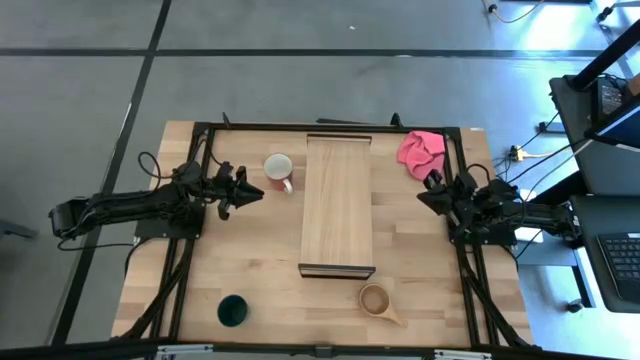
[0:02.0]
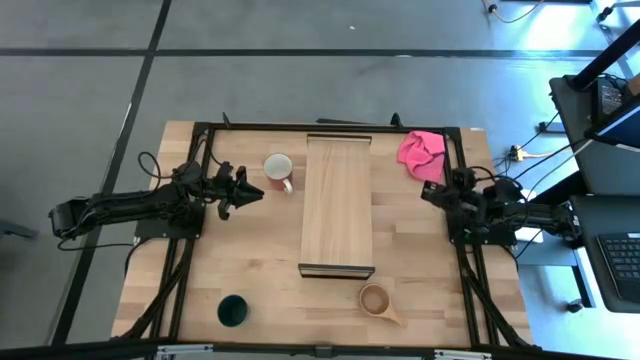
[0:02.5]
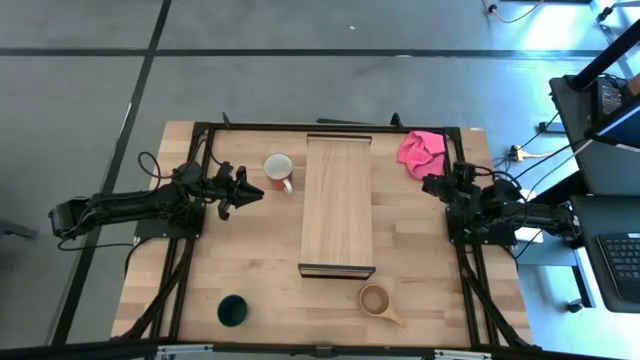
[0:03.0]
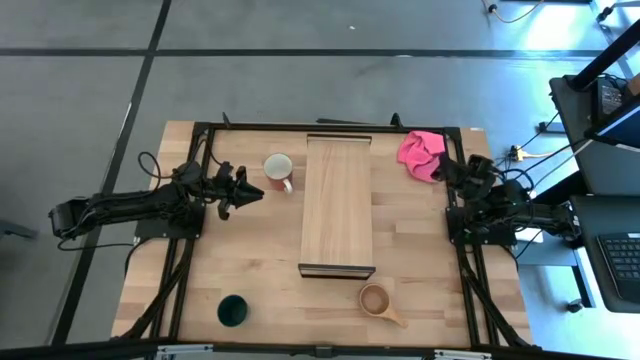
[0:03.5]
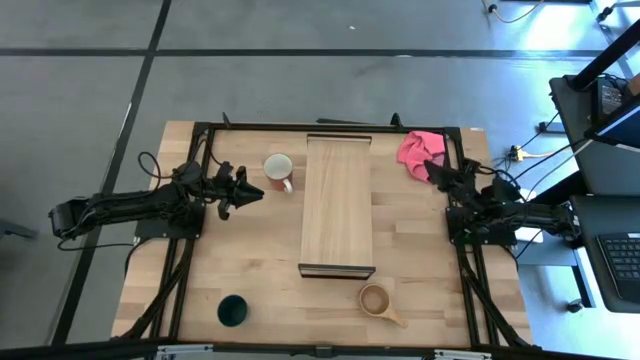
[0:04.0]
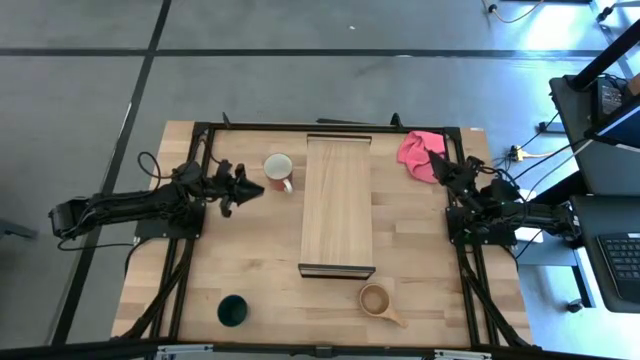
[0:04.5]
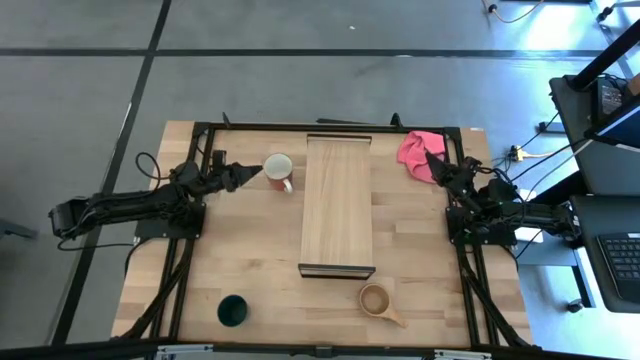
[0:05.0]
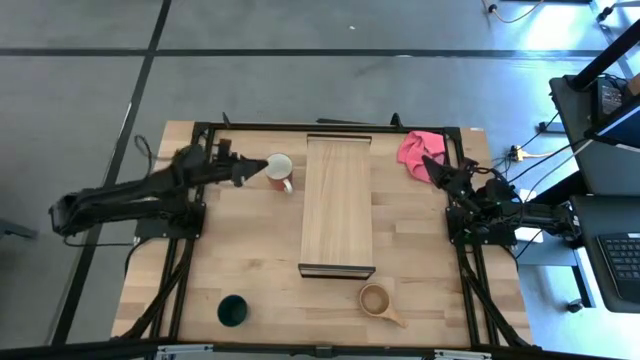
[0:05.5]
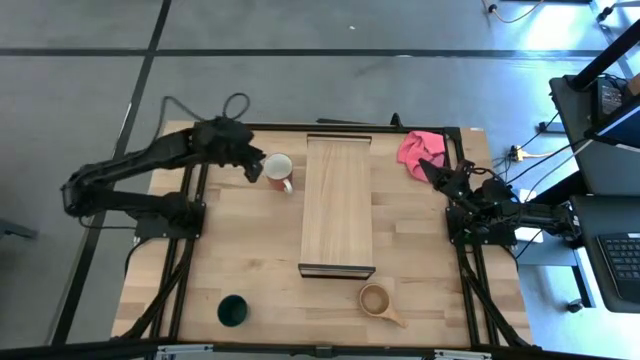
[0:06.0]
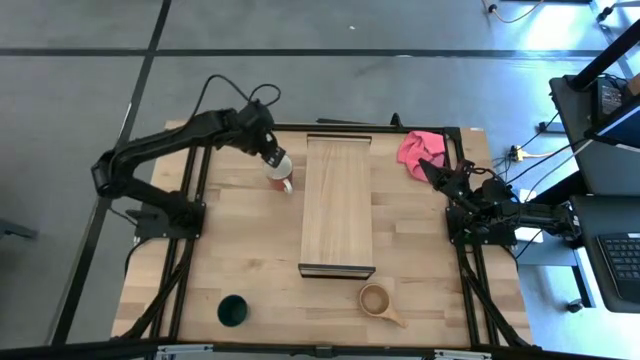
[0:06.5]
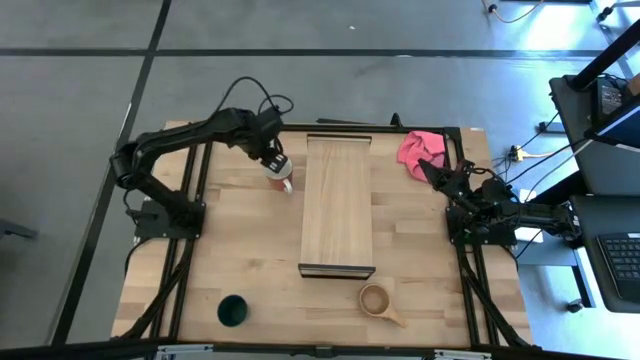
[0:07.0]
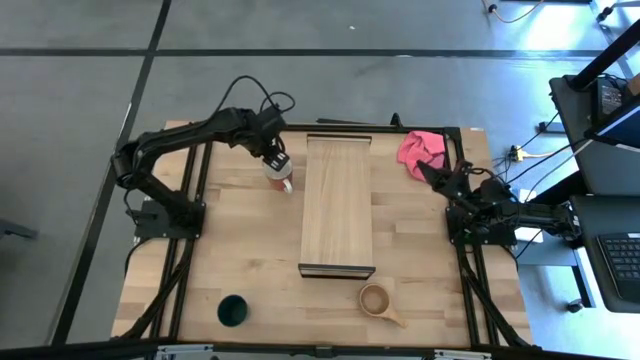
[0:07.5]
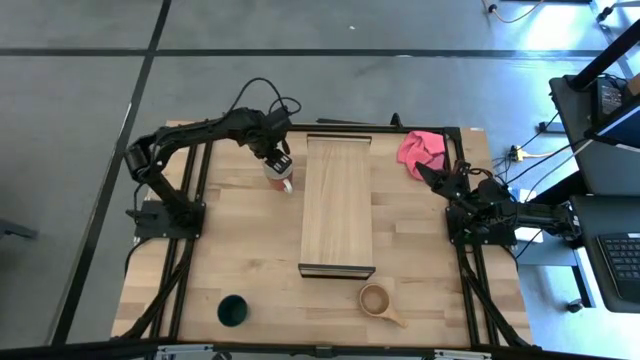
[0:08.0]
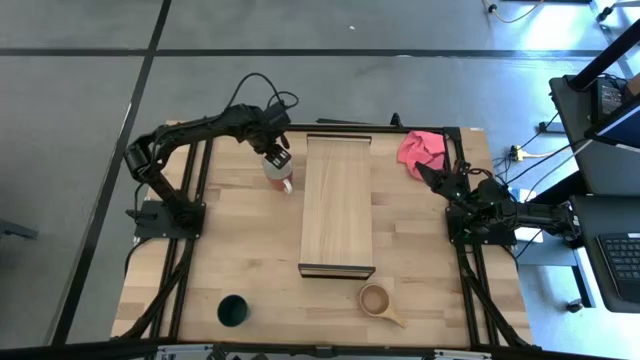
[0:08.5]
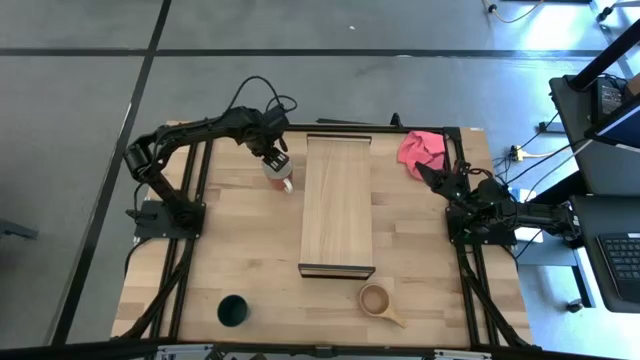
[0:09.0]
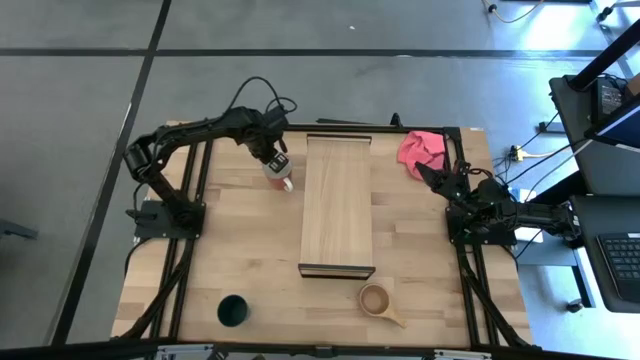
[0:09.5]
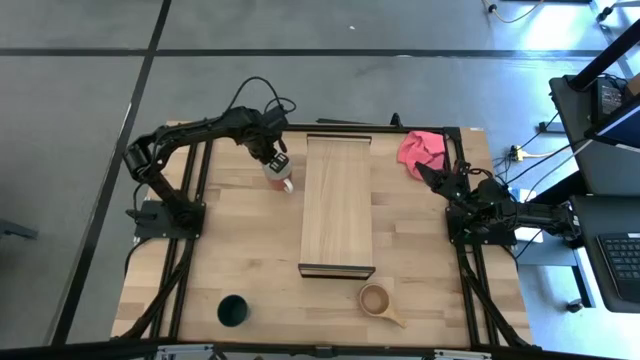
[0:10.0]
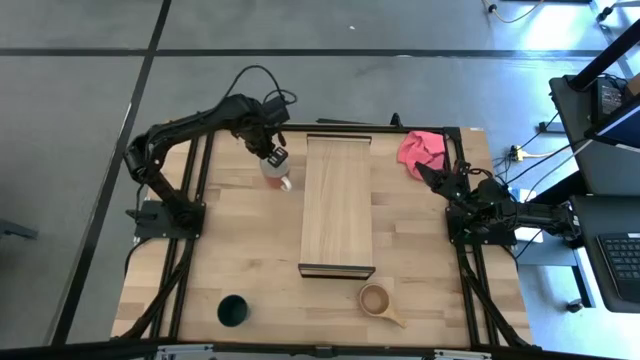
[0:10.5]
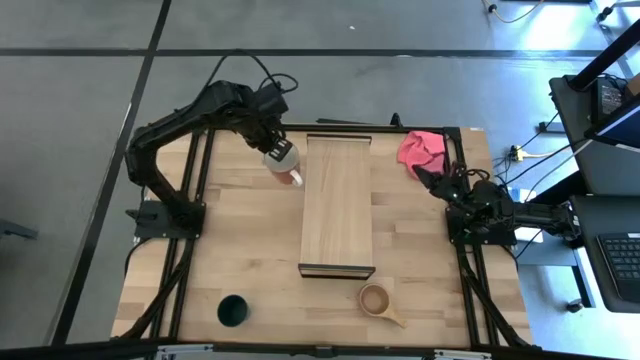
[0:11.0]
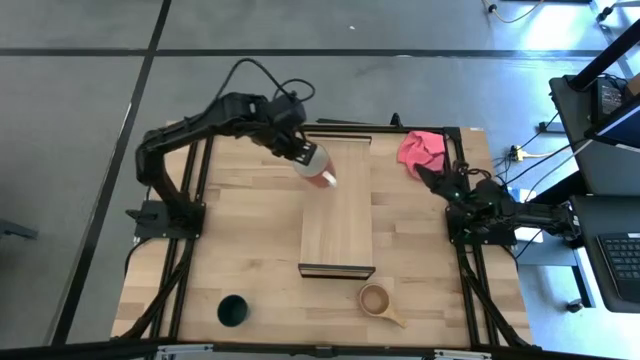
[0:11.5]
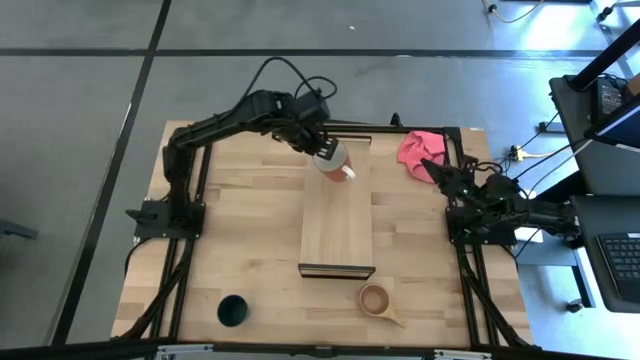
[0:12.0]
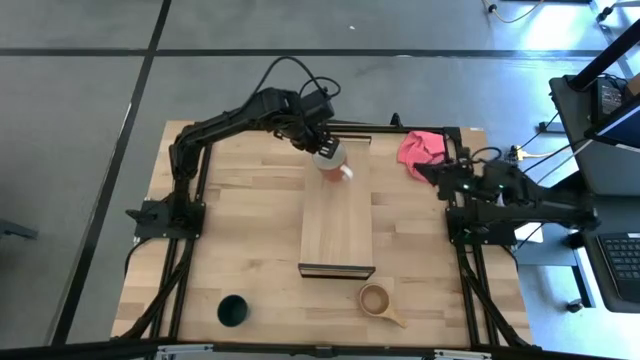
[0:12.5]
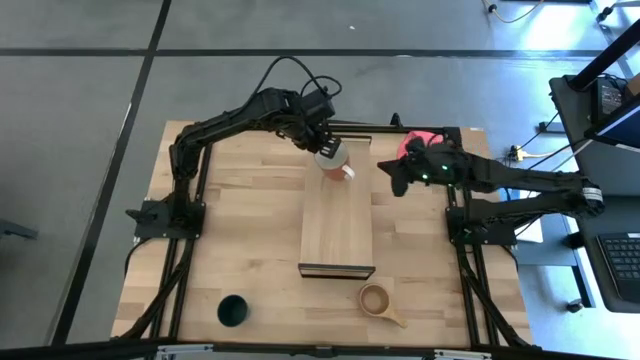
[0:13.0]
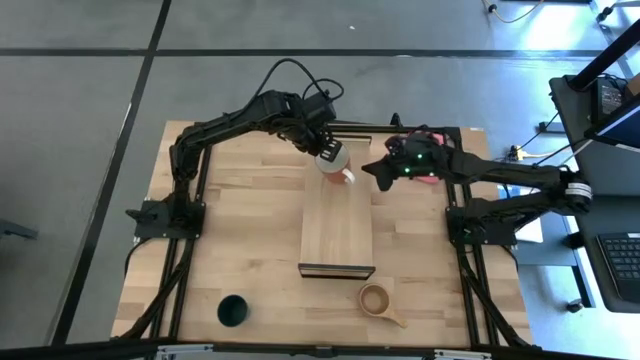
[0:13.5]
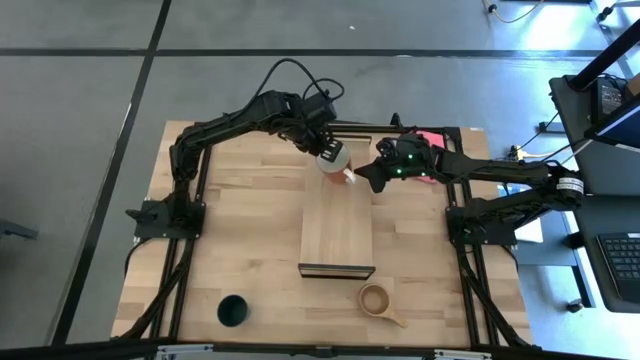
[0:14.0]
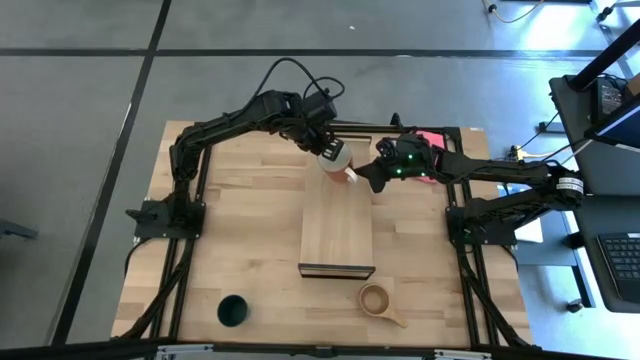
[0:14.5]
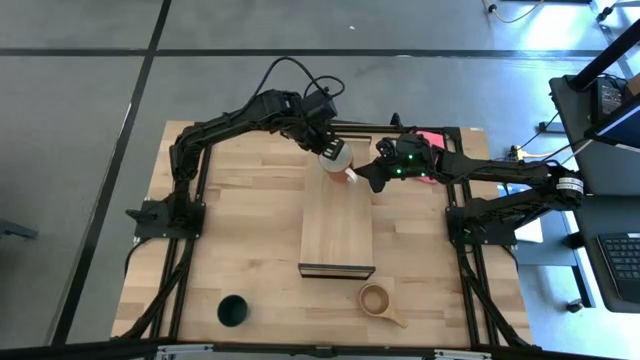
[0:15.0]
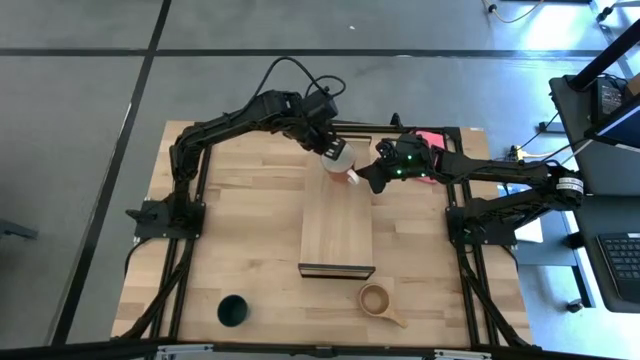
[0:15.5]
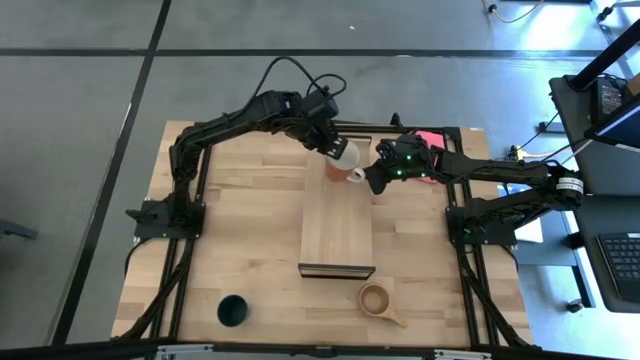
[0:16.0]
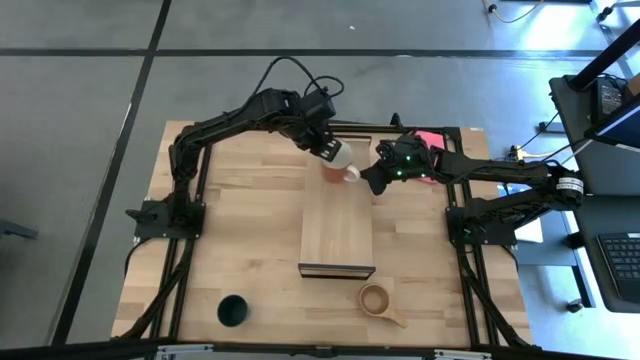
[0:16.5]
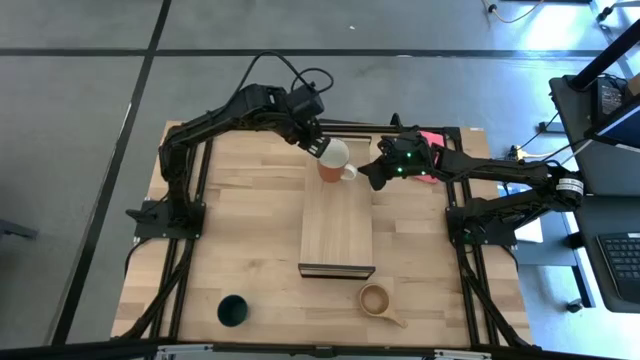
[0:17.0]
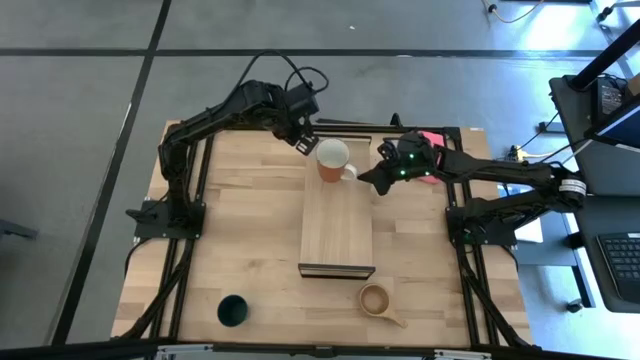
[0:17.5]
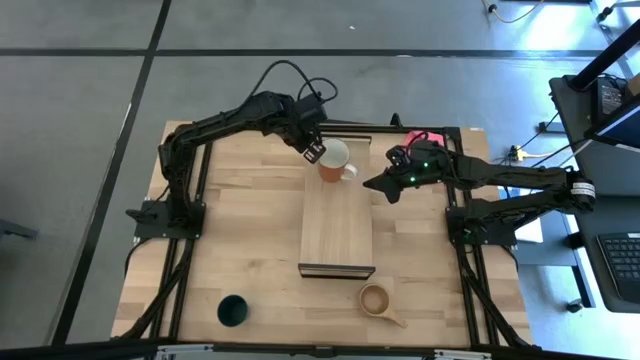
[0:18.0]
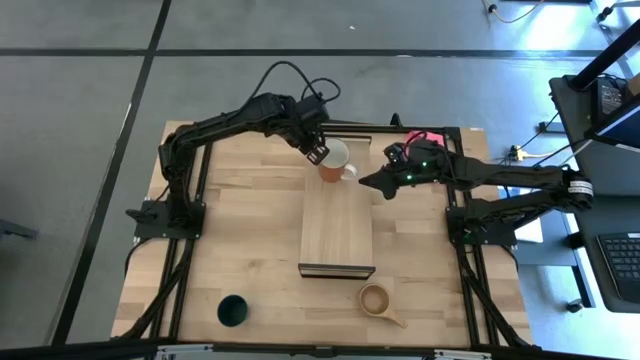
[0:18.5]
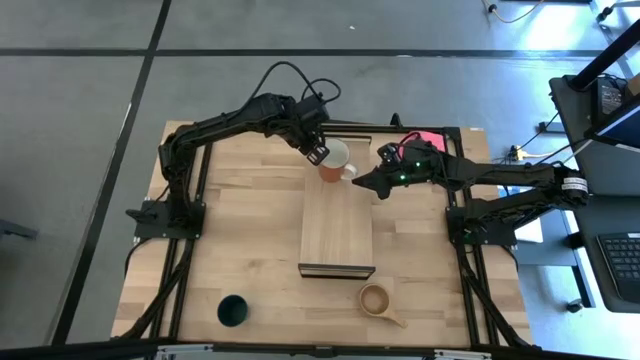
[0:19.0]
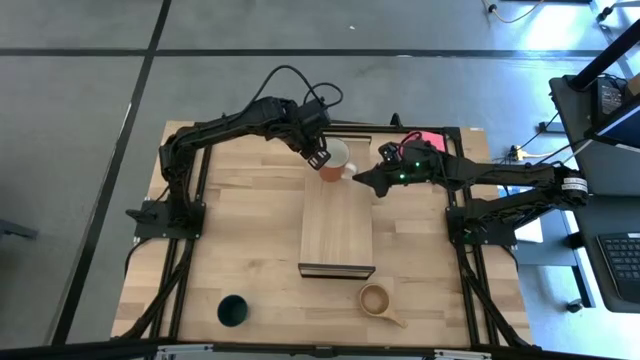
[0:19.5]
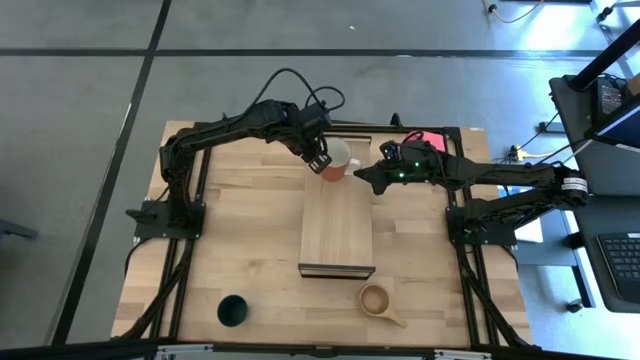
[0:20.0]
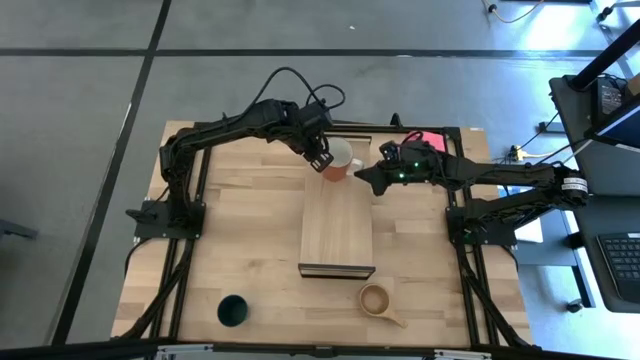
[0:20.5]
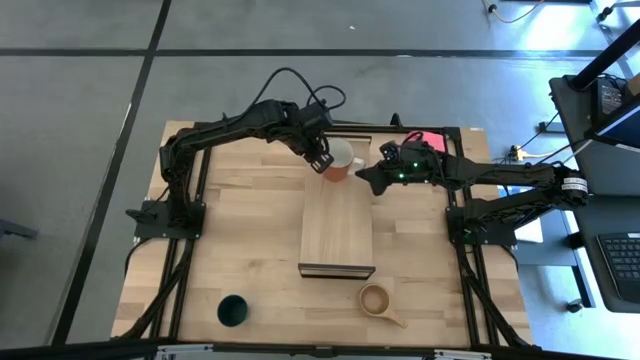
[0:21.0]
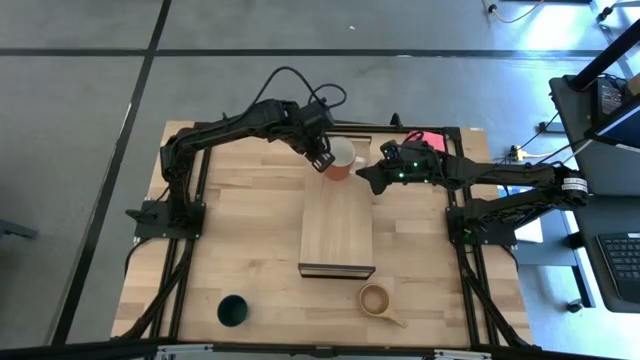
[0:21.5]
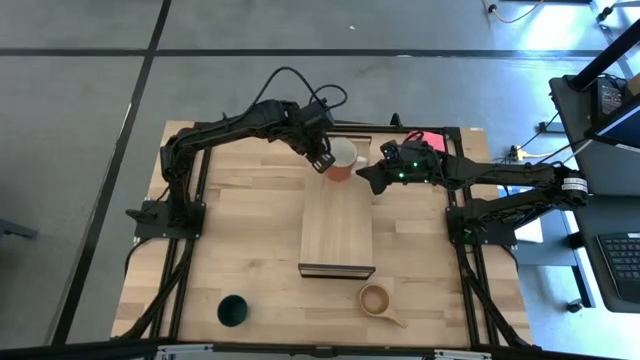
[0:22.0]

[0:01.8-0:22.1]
Task: Stack small to large cups/mugs on shelf
Put the red mug on the shelf
